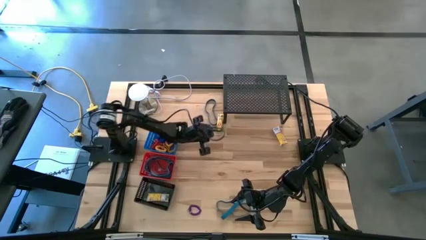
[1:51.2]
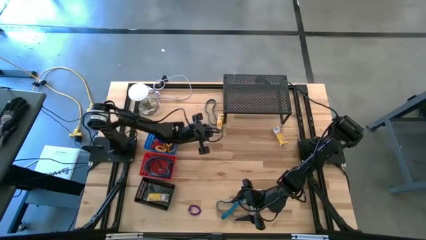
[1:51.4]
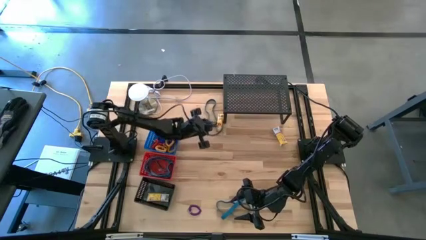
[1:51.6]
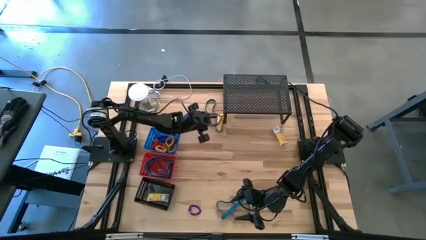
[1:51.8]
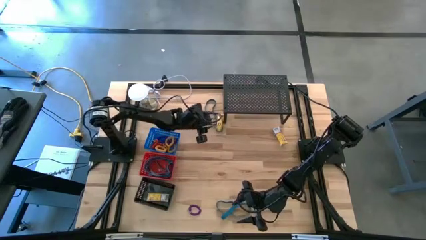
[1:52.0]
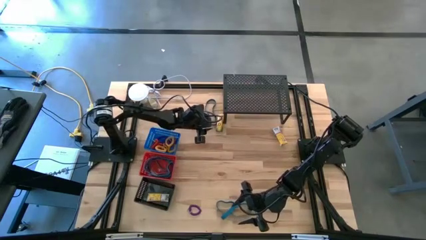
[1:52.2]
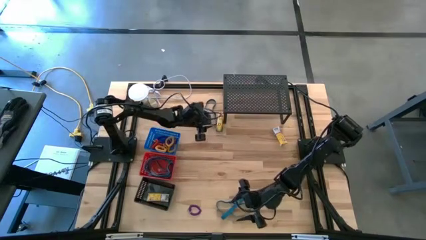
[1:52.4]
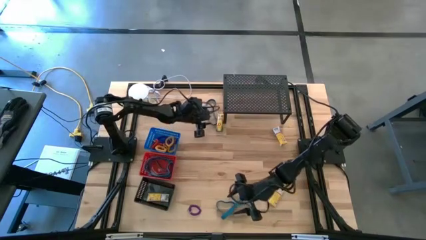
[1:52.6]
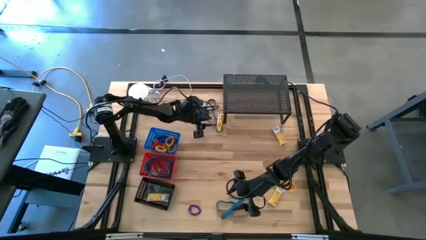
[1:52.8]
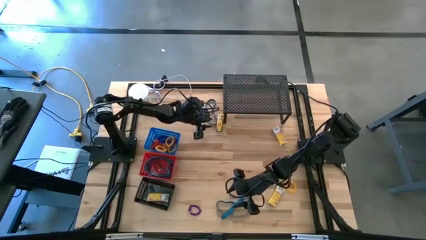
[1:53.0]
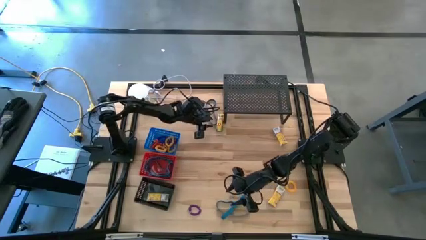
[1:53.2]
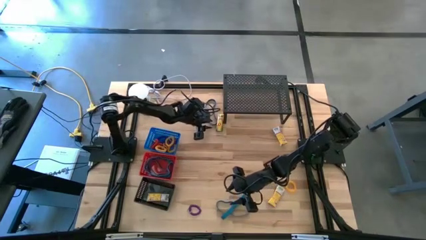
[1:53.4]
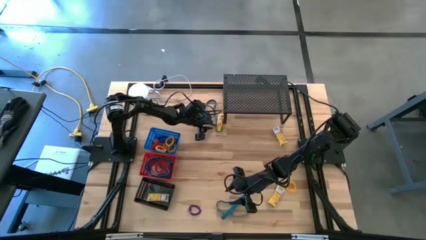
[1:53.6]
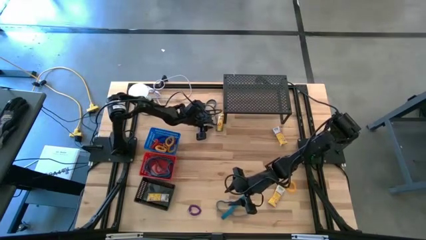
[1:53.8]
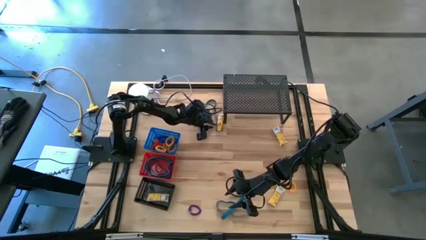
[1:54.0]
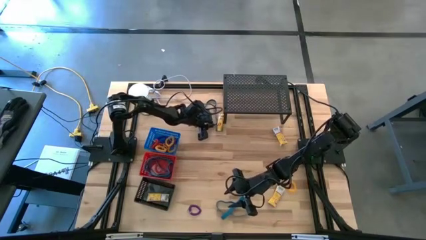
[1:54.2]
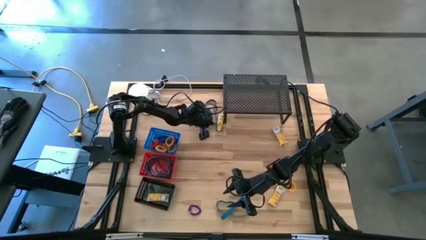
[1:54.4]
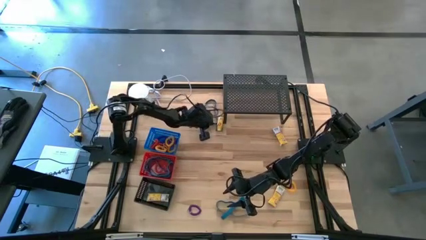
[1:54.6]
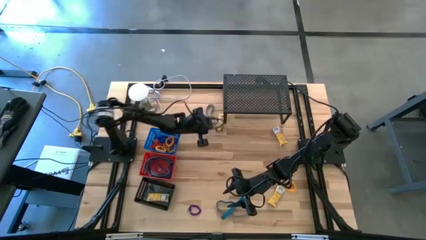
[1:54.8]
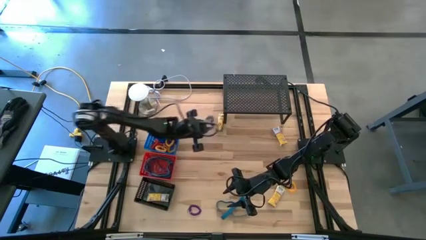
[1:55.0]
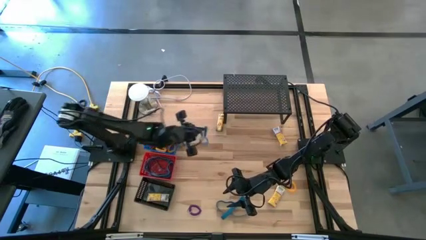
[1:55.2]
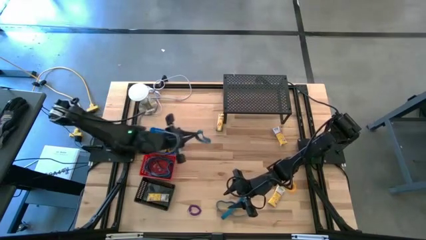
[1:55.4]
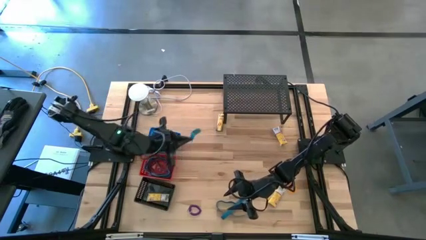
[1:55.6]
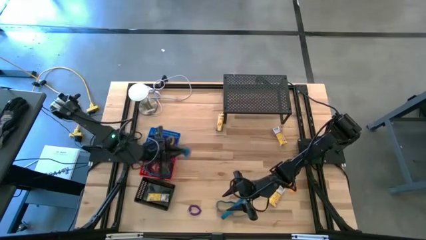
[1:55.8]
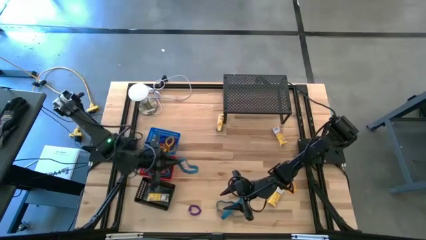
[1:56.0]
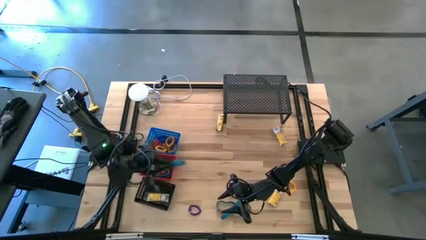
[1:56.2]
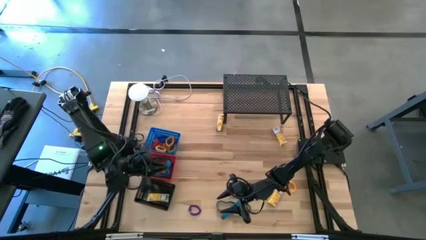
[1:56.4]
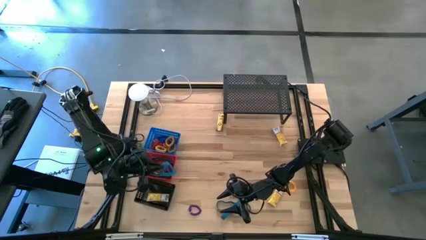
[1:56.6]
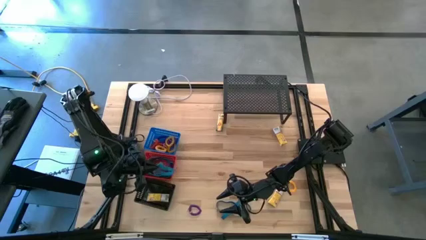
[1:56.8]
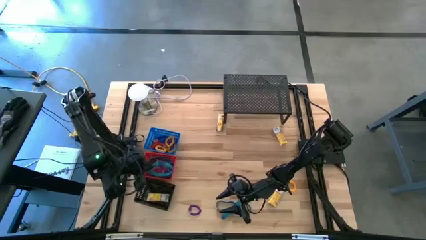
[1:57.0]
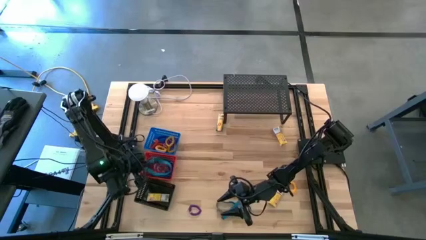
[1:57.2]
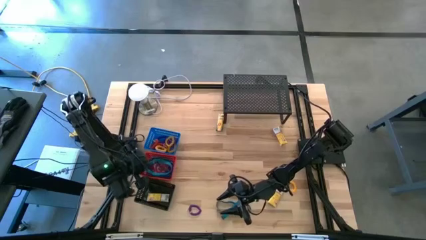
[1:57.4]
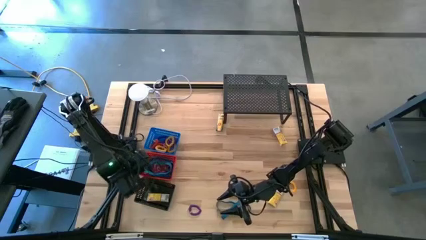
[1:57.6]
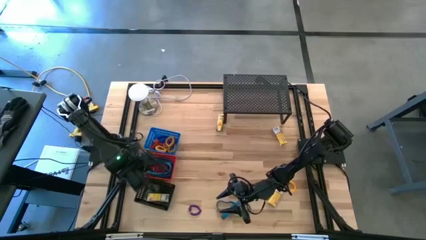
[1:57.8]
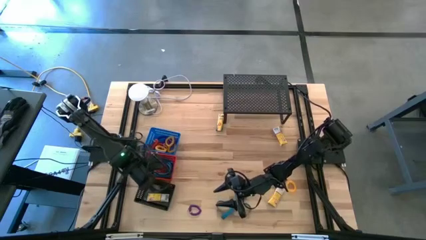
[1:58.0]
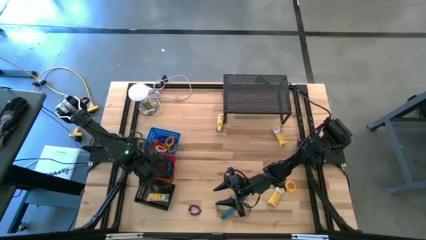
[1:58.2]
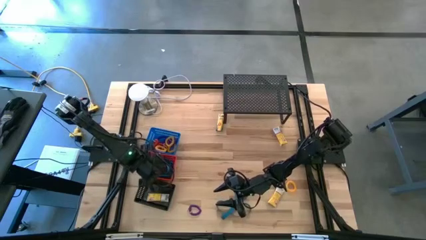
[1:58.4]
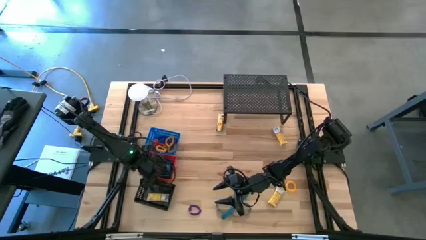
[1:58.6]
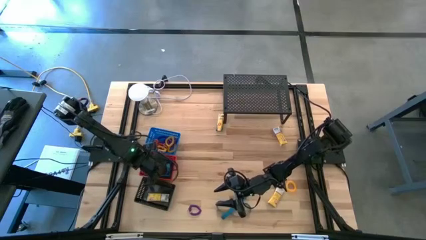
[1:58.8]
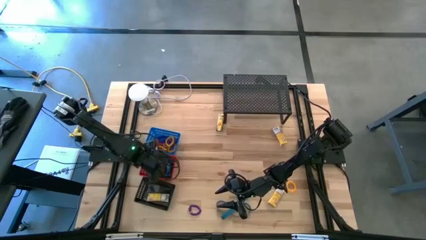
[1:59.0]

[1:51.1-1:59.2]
Task: Pick & Place Office Desk Supplies
Put the blue rubber band into the red bin

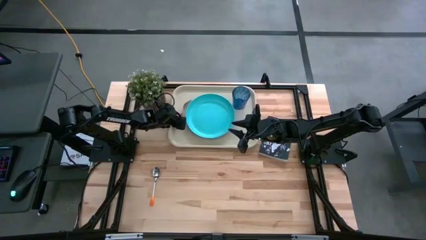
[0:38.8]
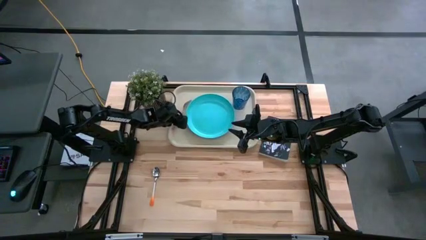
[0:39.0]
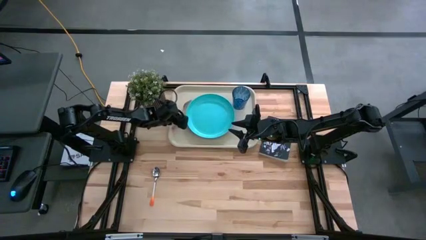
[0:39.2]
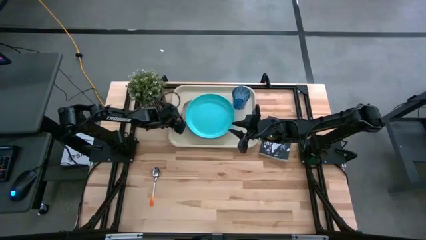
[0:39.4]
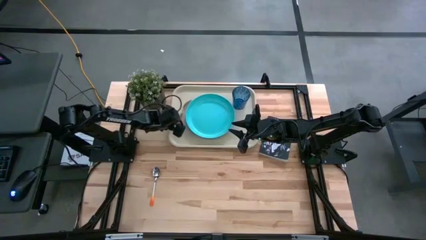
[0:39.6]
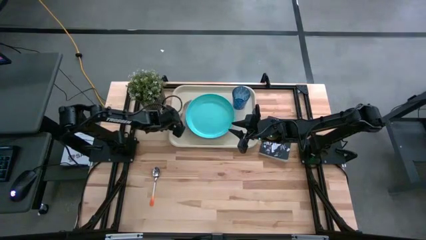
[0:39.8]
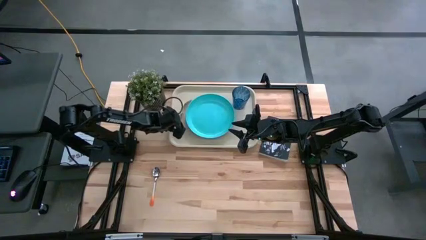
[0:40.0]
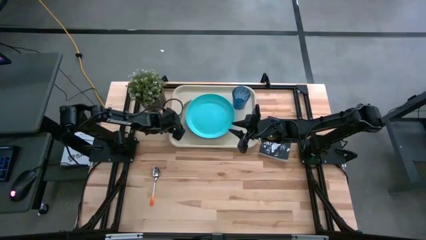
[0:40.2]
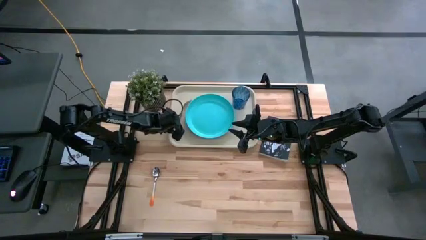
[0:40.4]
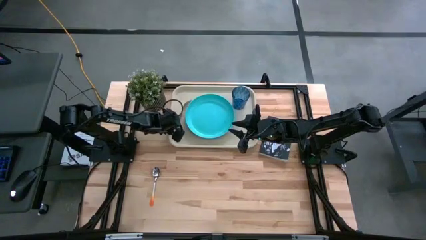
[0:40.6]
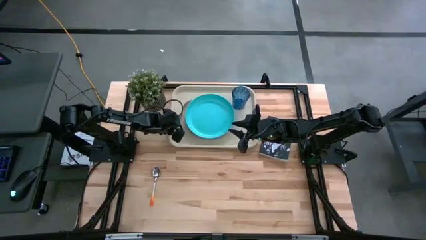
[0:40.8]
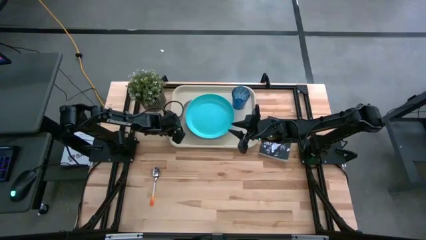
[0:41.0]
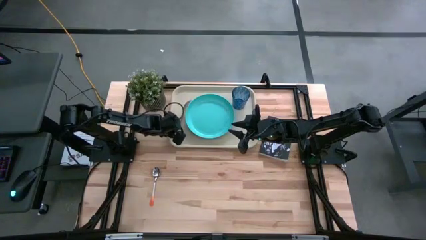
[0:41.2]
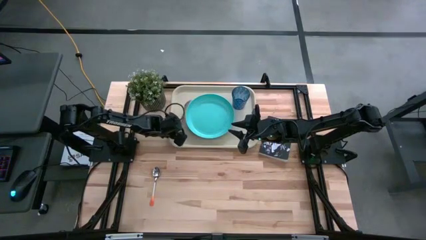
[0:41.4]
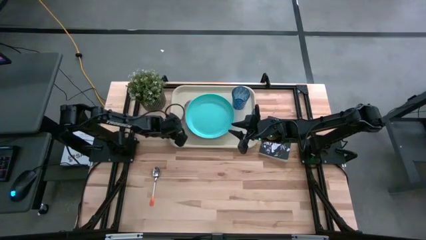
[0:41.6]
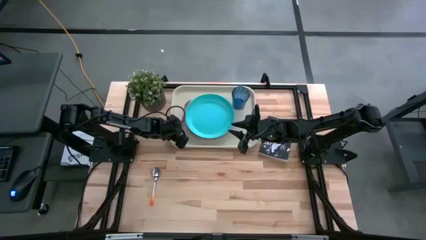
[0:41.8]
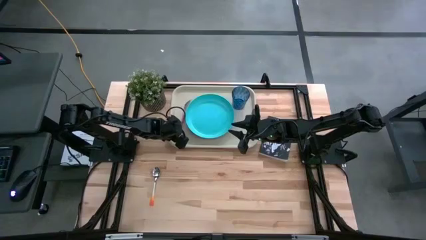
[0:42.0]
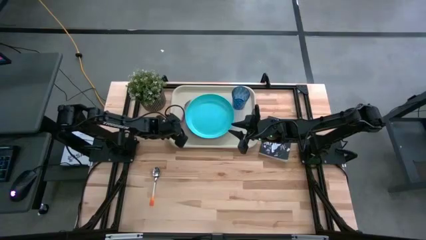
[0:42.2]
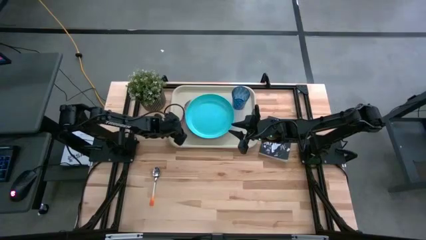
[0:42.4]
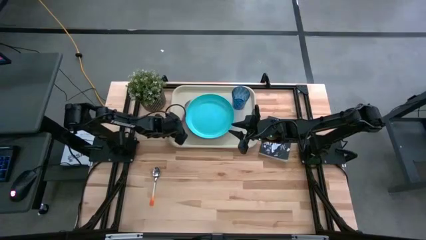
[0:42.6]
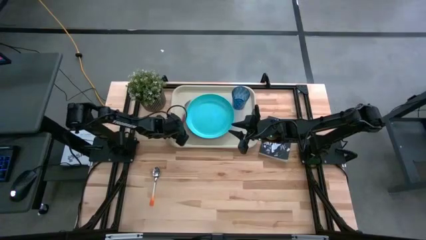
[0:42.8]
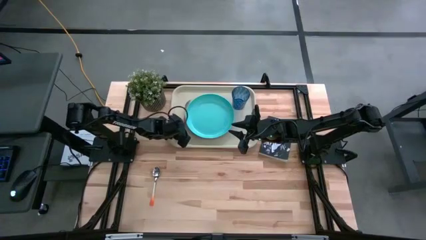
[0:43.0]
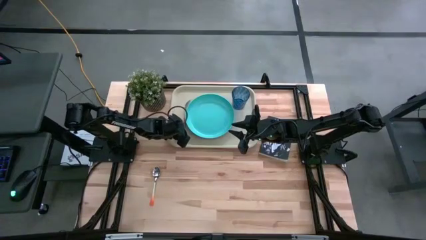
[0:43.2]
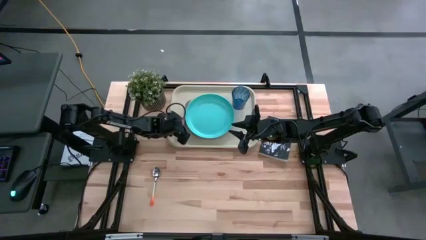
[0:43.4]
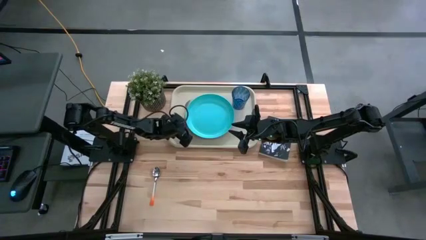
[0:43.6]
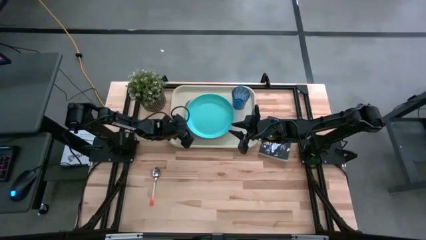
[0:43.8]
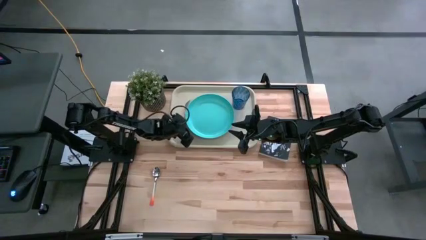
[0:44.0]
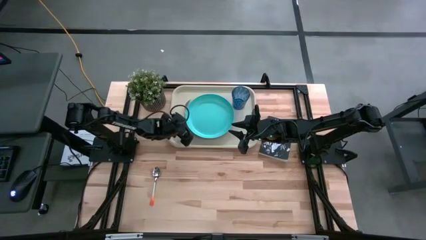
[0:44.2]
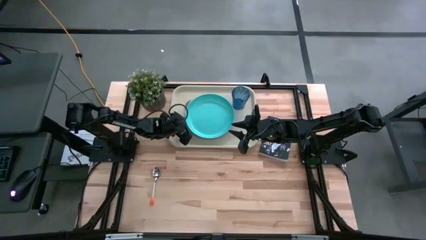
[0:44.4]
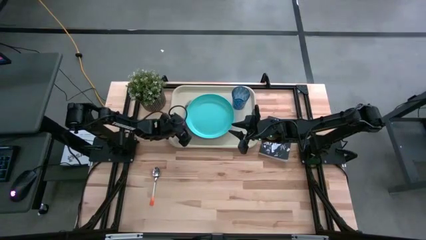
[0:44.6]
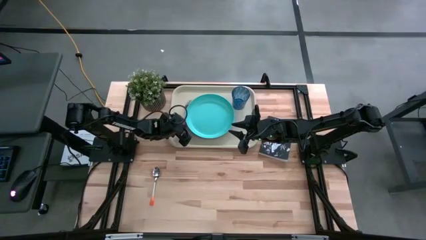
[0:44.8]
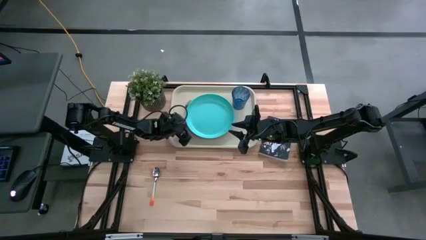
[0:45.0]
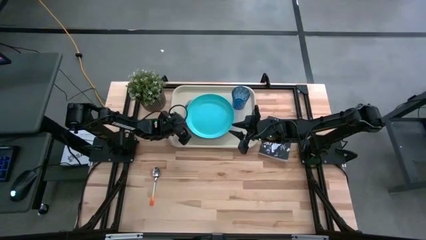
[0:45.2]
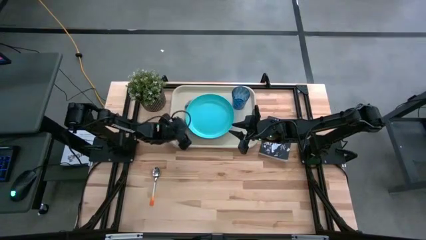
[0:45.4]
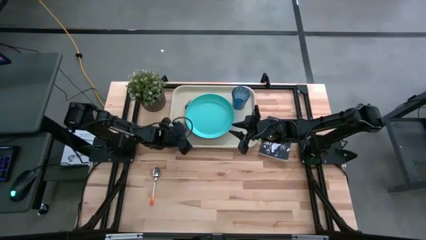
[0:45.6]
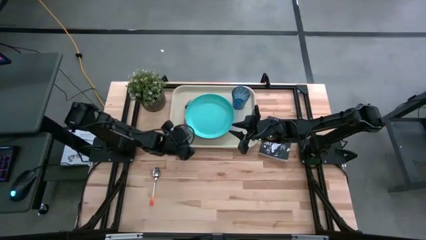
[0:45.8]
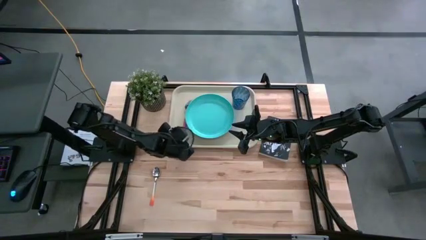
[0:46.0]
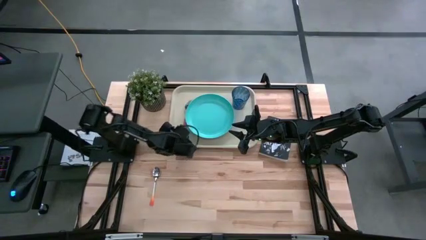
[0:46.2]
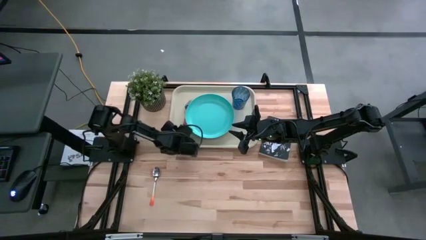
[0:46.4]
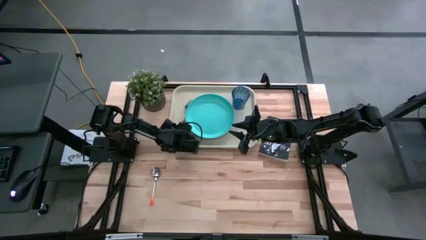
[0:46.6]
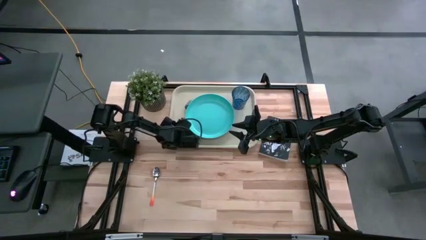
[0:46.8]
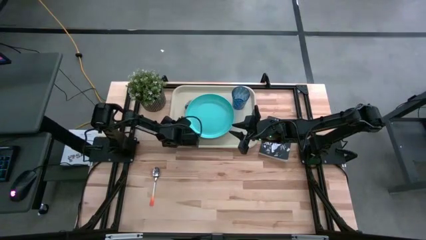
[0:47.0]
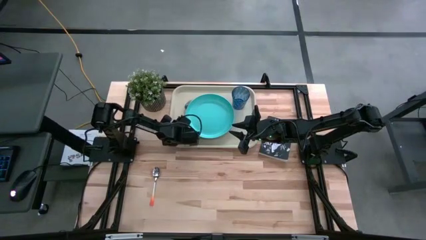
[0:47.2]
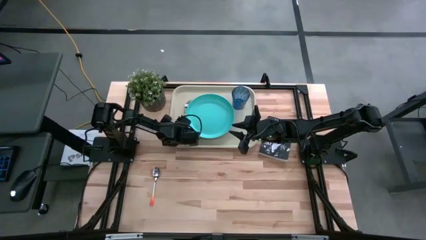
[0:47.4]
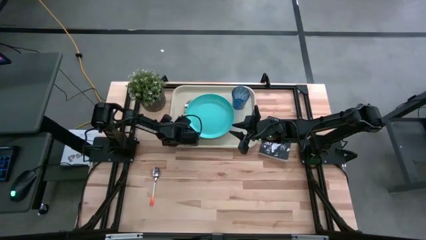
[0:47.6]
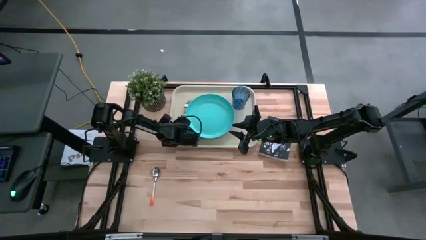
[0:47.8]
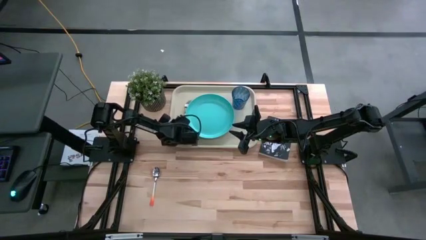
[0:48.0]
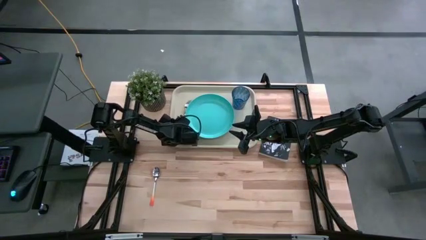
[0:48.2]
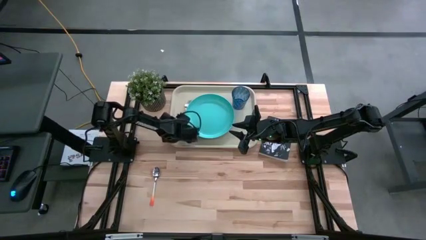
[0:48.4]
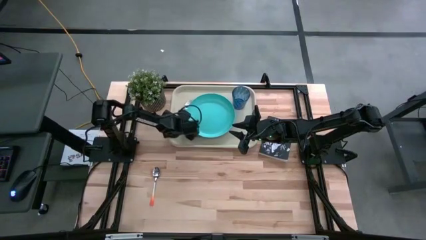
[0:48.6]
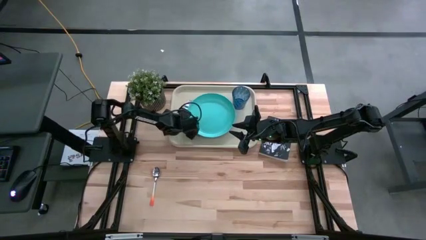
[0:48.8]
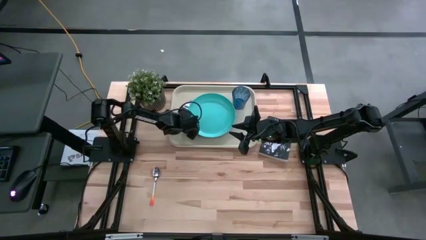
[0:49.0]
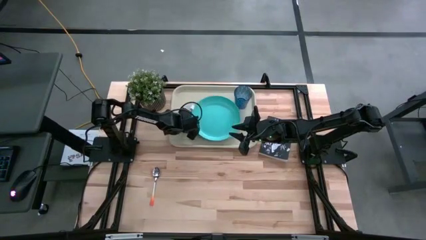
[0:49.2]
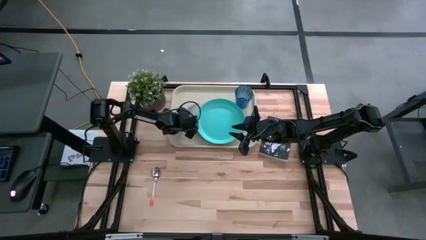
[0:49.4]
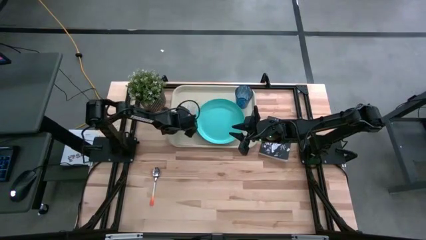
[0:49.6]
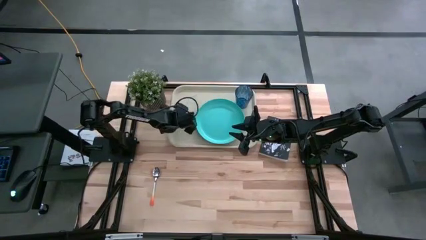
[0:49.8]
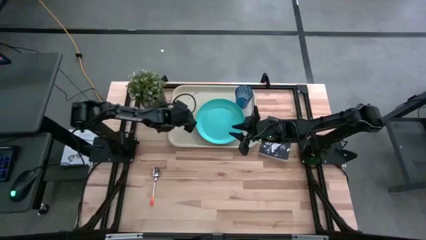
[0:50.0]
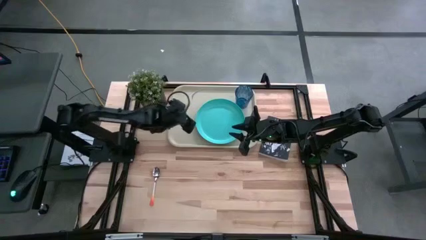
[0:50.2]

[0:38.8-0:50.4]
Task: Pick and place plate/cup/fork/spoon on tray
Put the red fork on the white serving tray to the left of the blue plate
